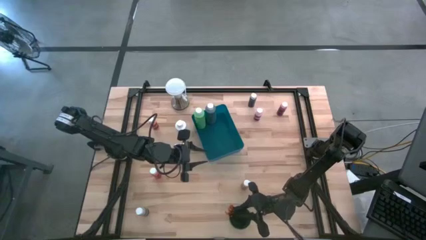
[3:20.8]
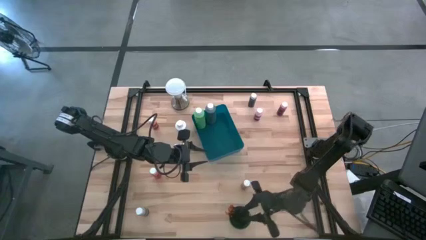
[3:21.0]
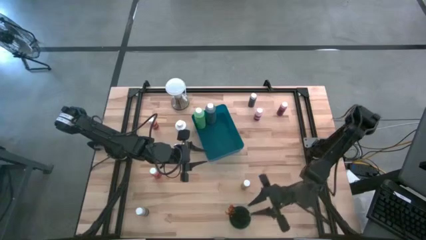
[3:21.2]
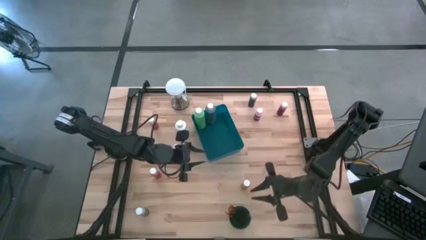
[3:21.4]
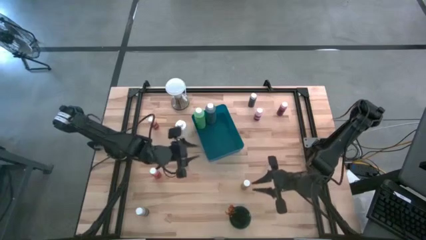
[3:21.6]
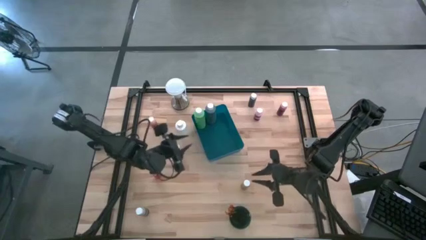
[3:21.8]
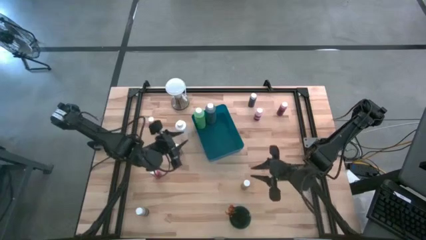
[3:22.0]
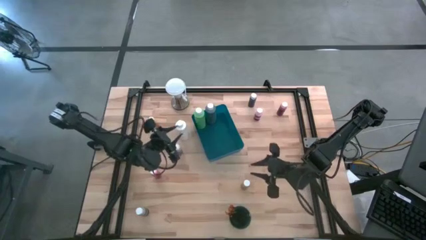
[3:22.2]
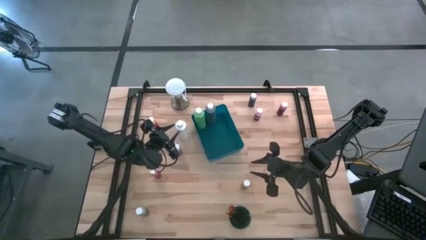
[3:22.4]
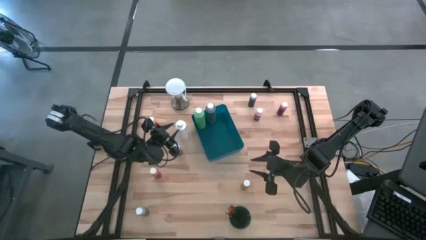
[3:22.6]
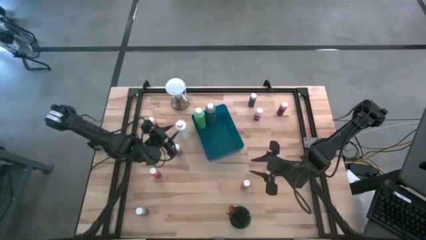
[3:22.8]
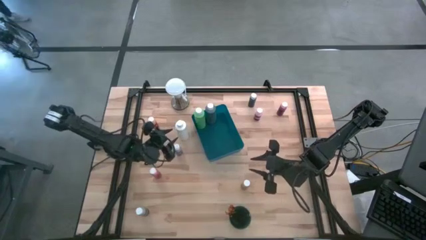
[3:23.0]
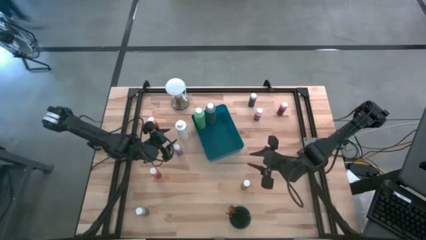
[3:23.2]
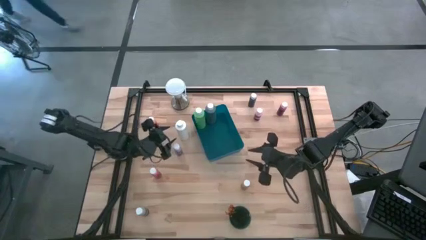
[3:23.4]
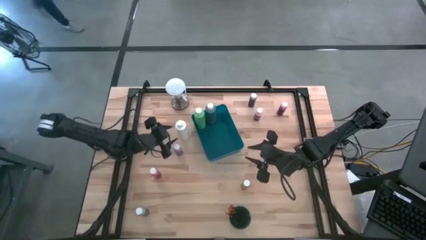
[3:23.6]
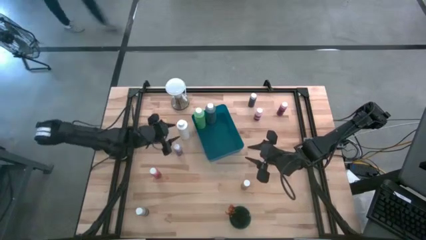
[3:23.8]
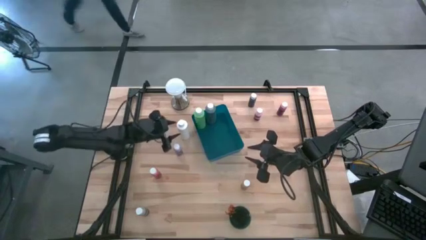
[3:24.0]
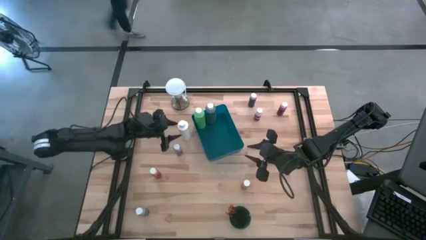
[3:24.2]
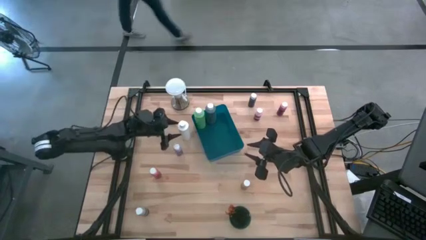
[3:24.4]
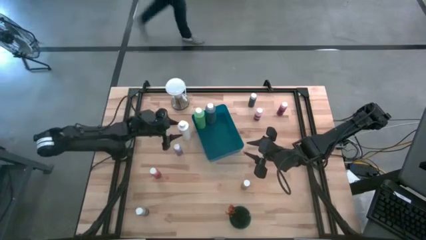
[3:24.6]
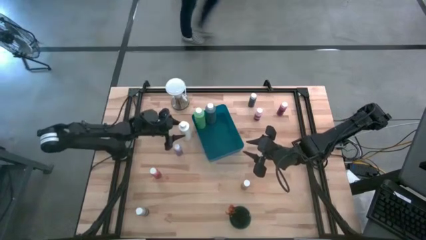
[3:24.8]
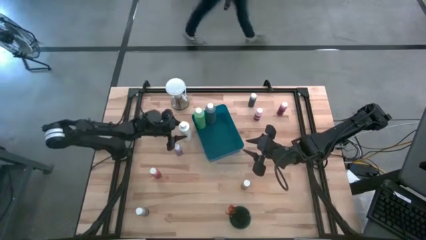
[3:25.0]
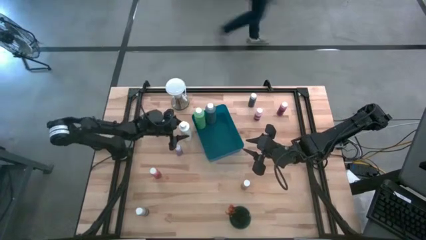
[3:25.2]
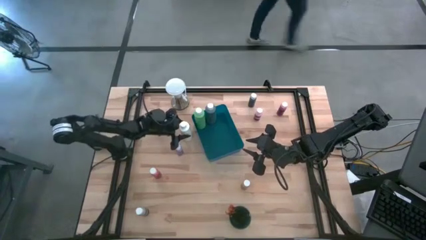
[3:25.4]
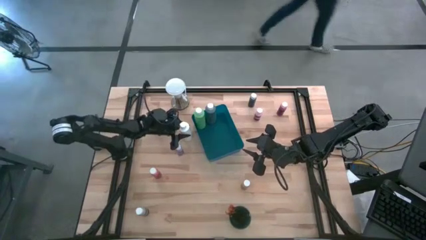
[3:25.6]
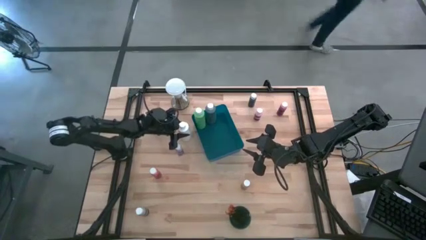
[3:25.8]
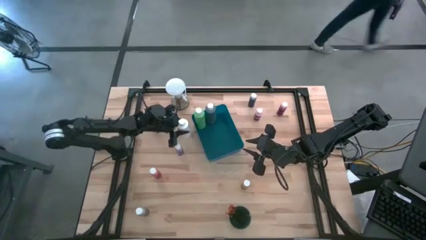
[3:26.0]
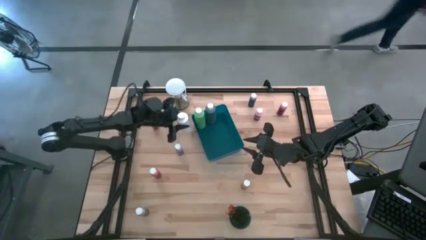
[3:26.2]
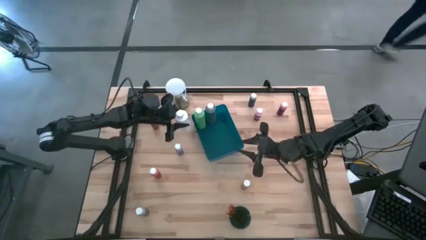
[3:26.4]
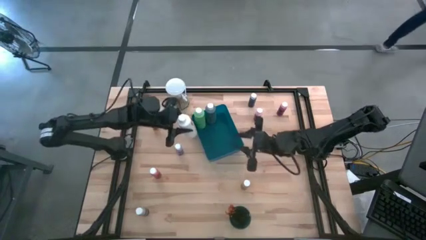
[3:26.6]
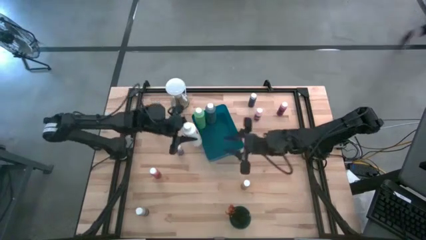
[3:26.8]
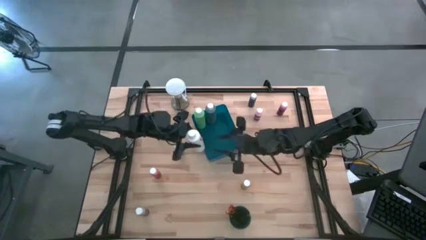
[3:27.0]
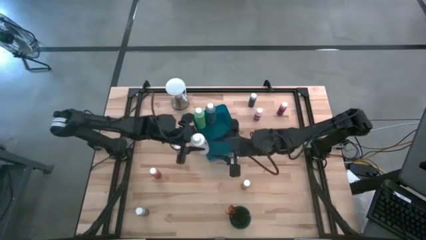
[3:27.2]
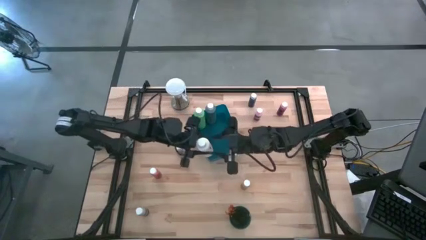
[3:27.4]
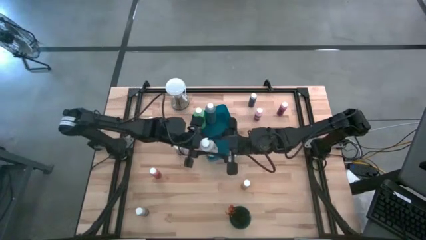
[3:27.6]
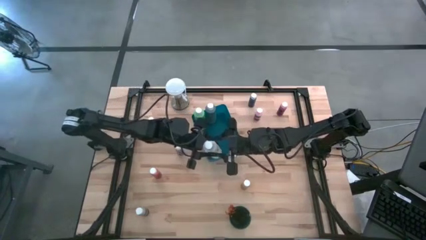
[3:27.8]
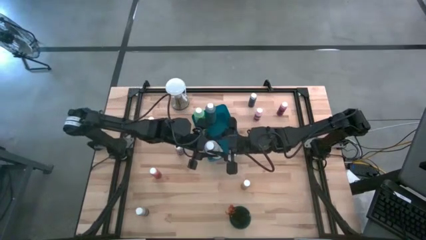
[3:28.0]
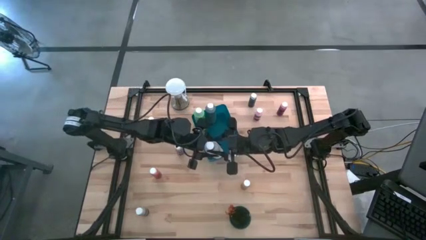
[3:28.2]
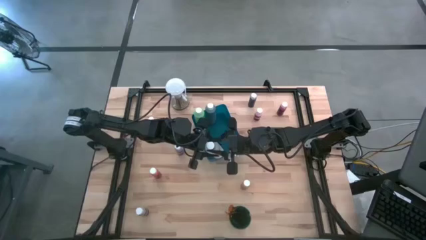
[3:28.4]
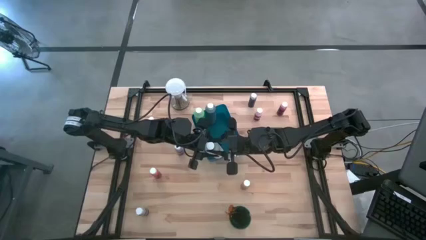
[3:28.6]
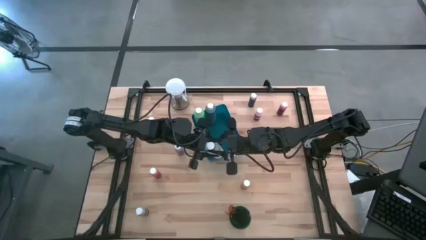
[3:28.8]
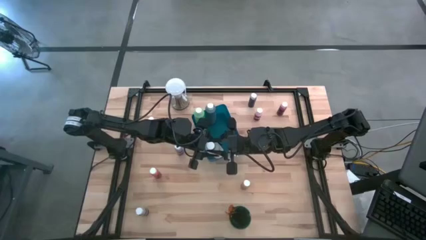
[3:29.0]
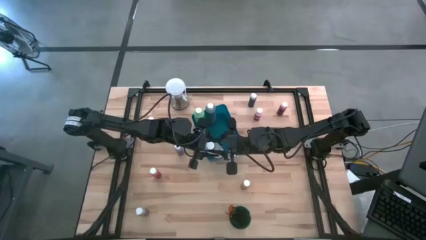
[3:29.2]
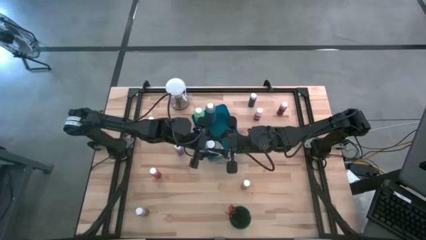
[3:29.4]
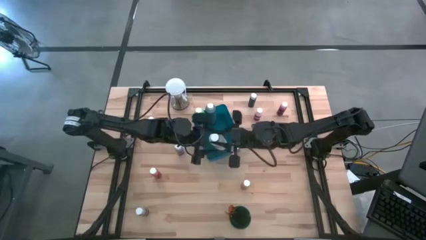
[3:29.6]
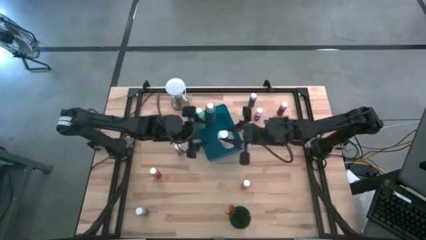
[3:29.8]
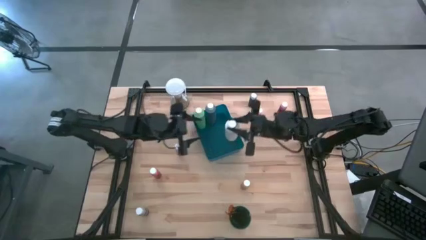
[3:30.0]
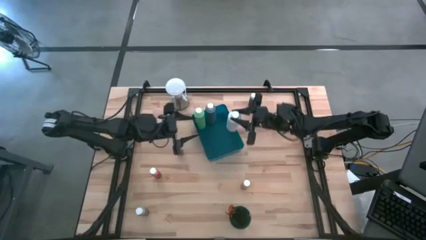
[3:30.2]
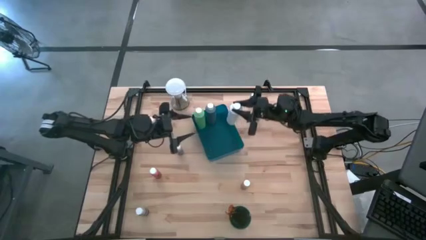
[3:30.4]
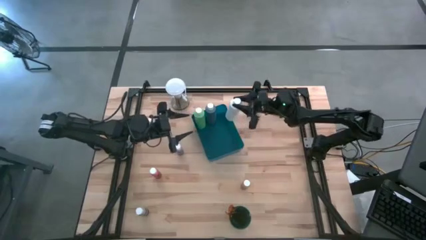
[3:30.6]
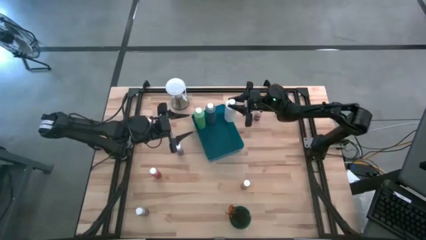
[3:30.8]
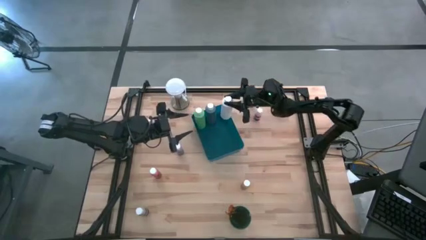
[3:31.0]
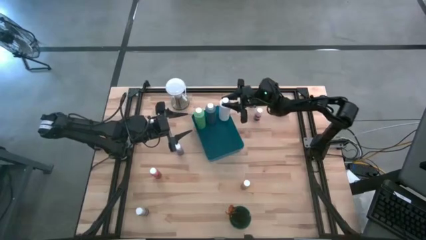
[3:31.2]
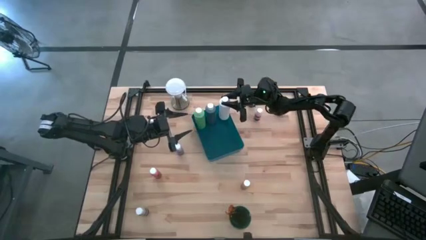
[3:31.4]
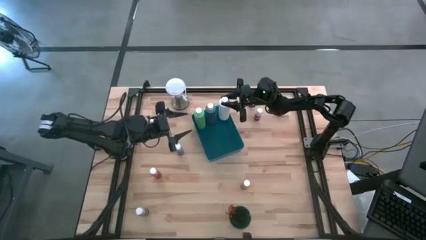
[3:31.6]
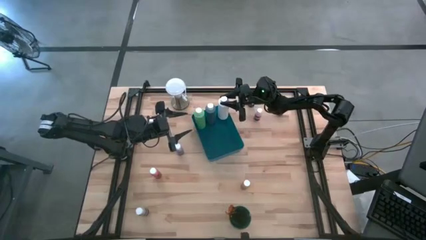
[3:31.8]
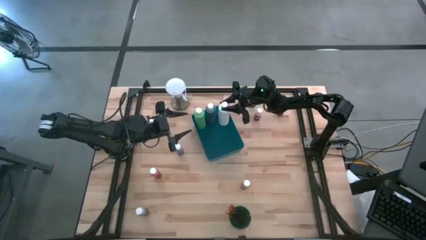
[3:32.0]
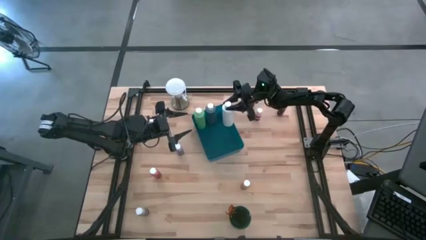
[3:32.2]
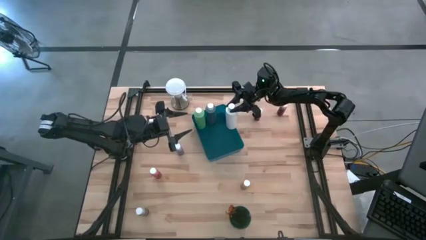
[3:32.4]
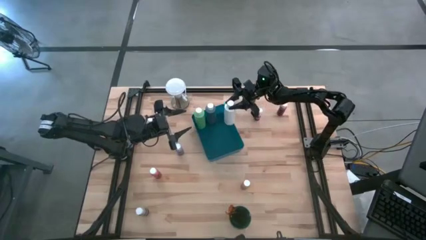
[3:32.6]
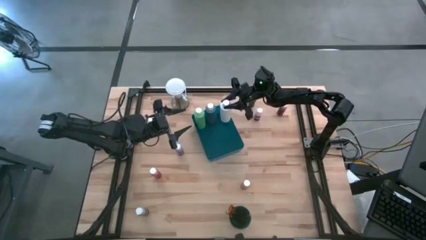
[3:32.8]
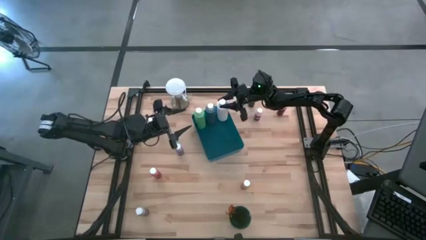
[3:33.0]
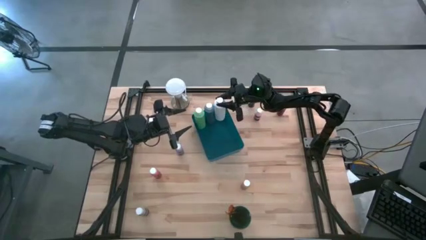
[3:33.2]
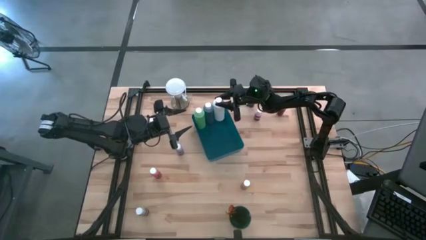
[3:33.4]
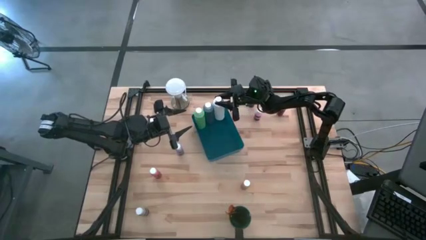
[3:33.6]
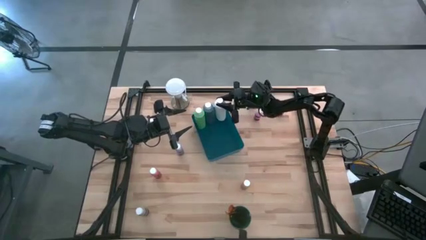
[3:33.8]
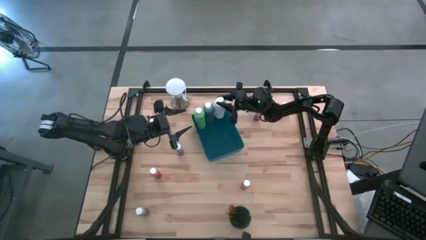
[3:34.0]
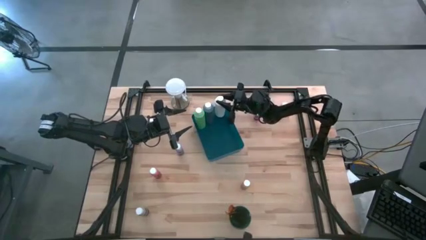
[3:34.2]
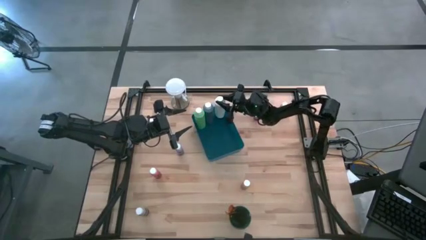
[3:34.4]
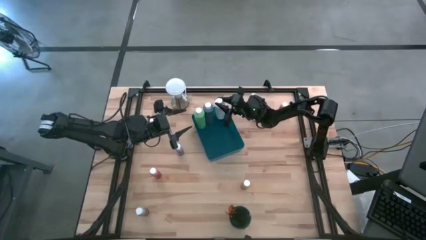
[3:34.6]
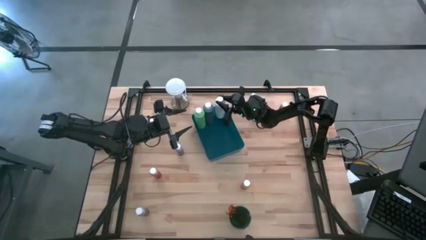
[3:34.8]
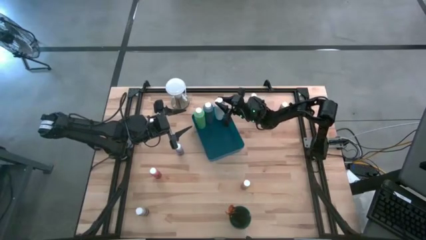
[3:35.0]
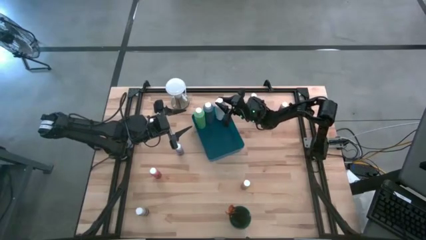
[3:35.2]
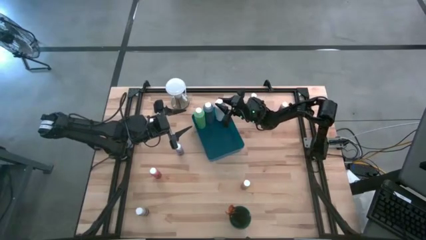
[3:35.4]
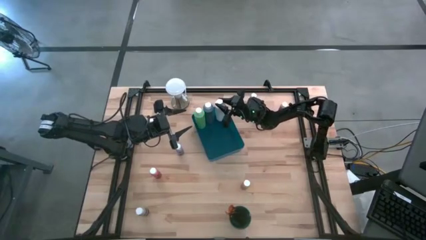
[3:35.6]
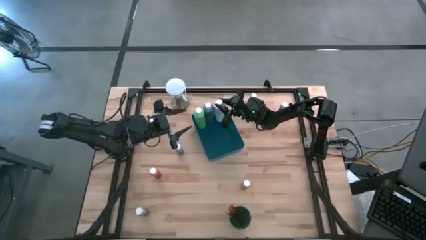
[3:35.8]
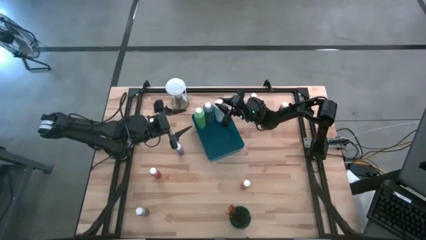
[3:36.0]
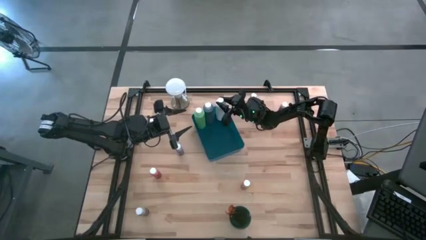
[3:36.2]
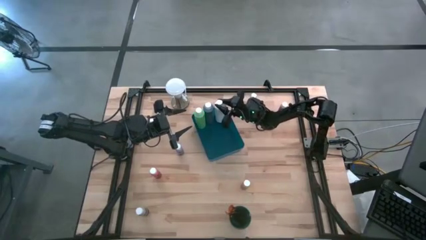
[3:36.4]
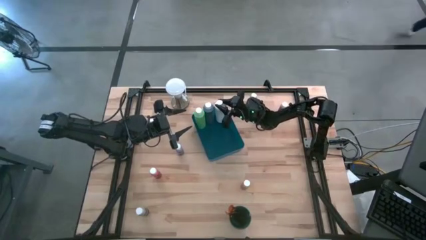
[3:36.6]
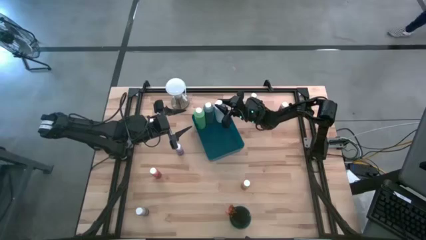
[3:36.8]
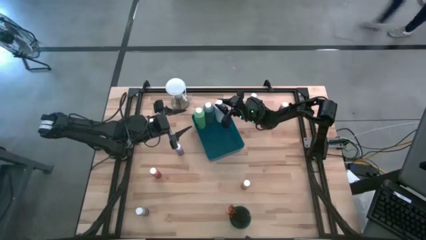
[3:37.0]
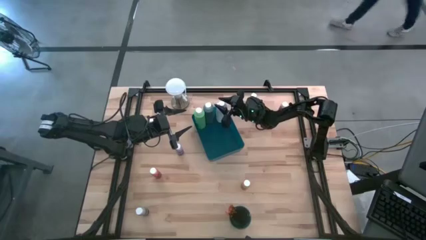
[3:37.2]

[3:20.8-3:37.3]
Task: Pick & Place Paint Supplies
Put the white paint bottle into the blue bin
